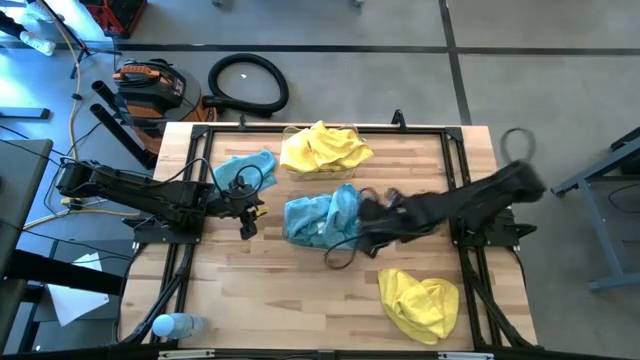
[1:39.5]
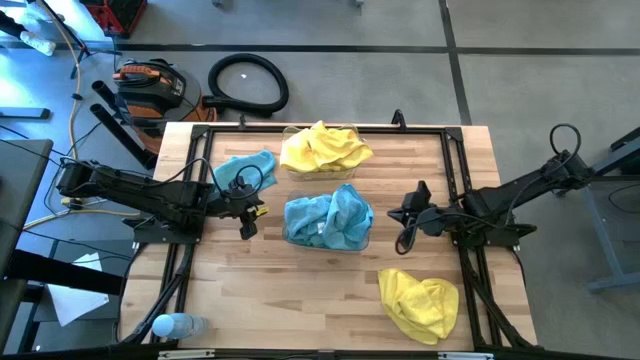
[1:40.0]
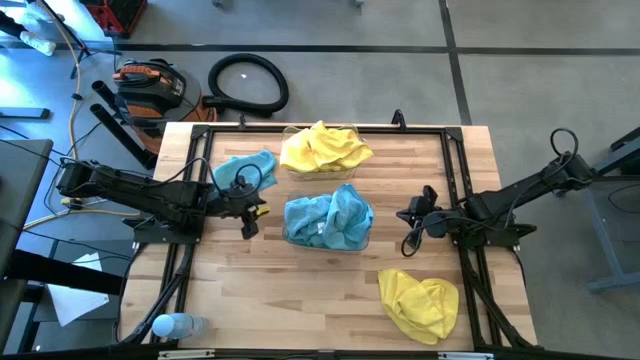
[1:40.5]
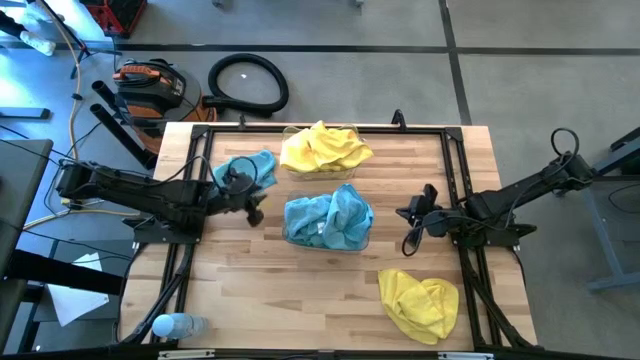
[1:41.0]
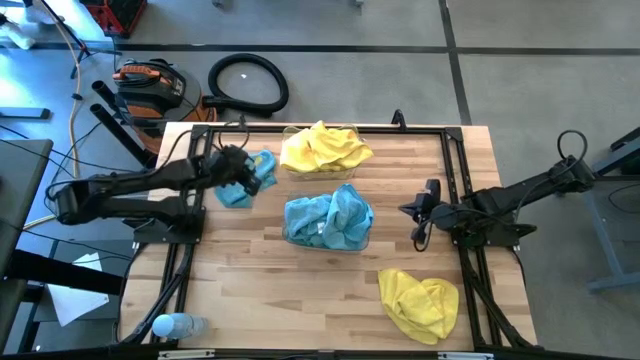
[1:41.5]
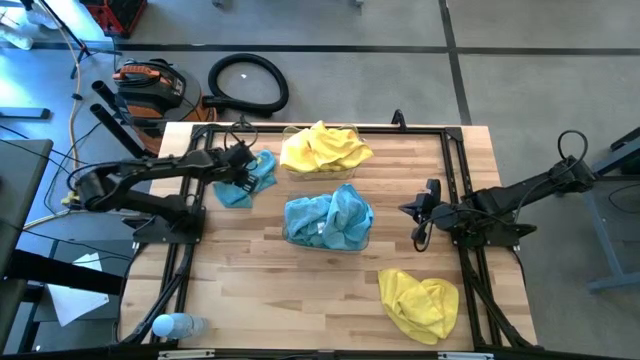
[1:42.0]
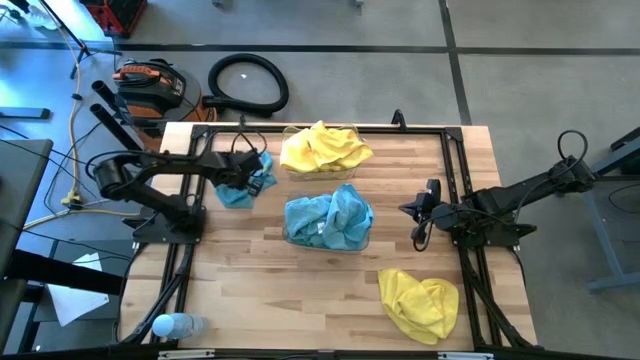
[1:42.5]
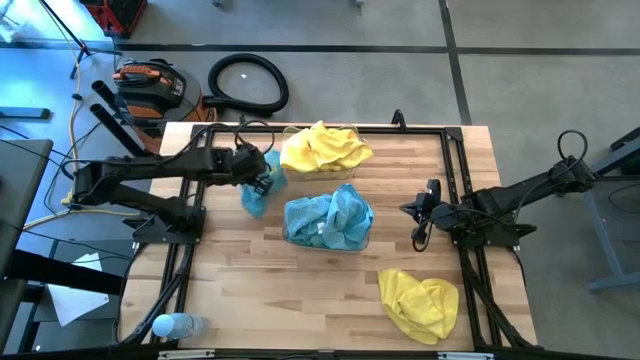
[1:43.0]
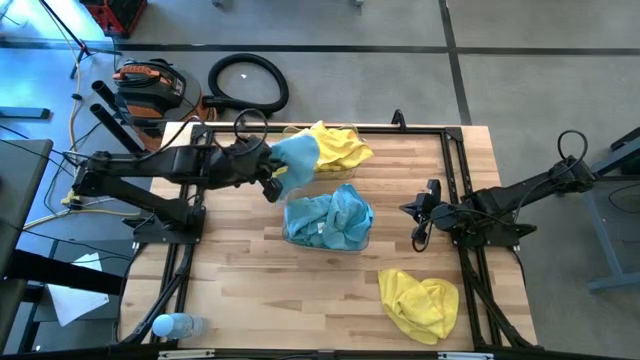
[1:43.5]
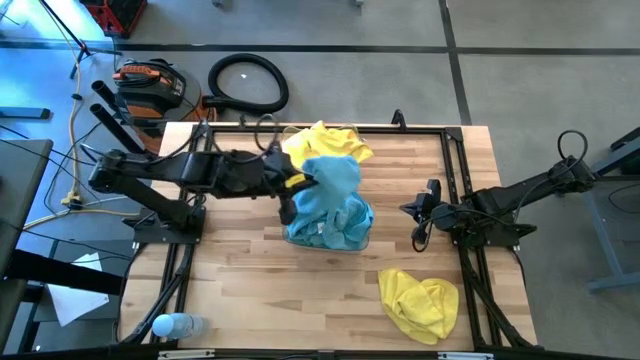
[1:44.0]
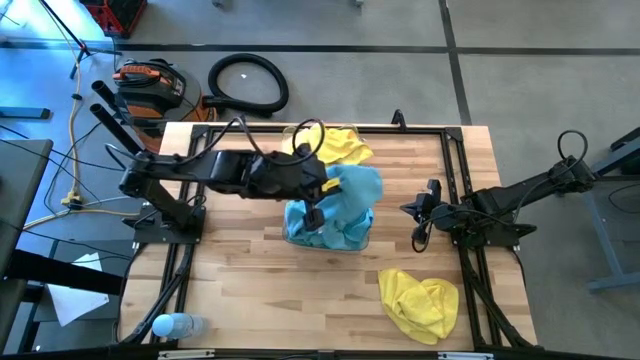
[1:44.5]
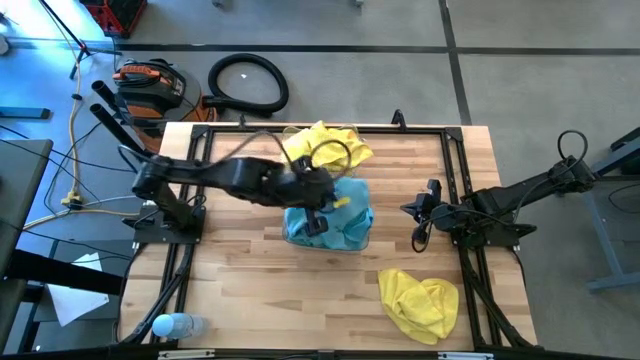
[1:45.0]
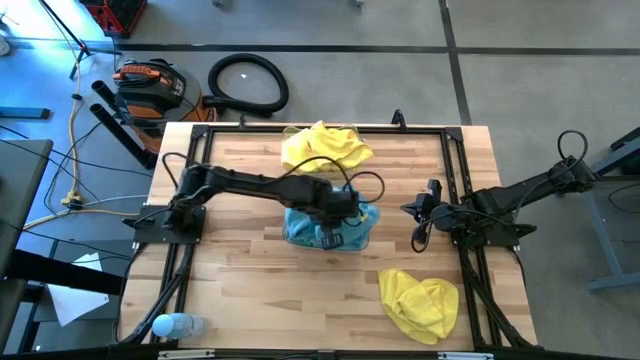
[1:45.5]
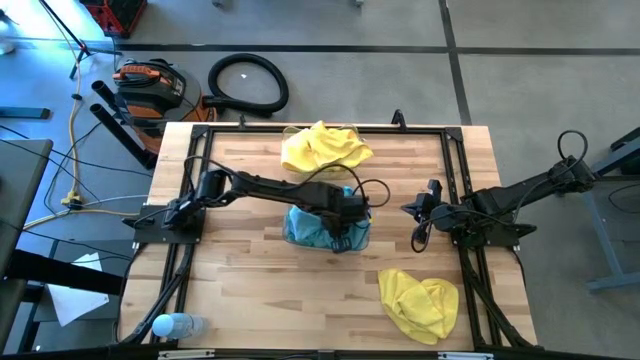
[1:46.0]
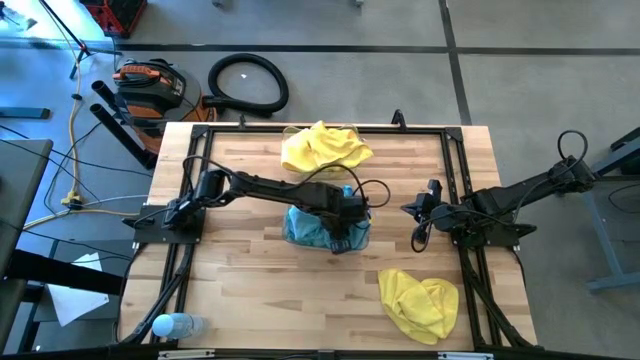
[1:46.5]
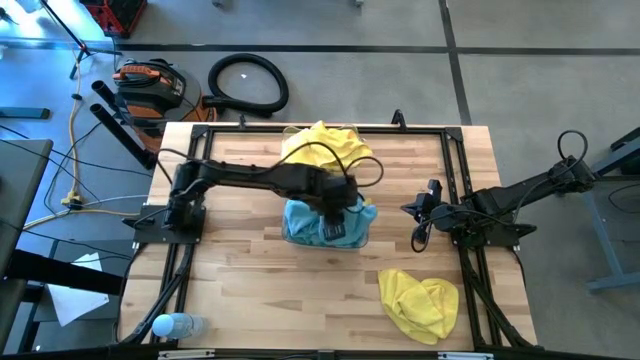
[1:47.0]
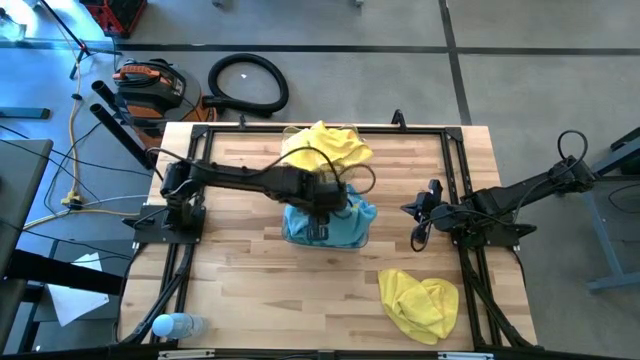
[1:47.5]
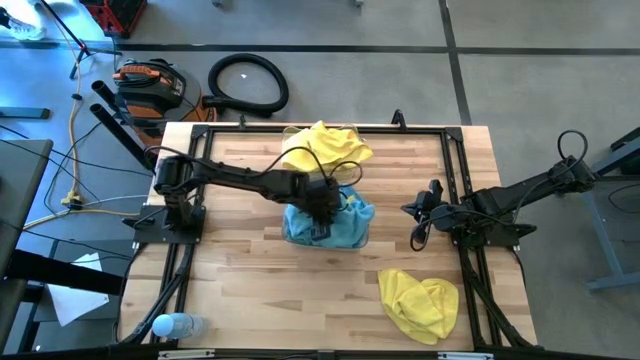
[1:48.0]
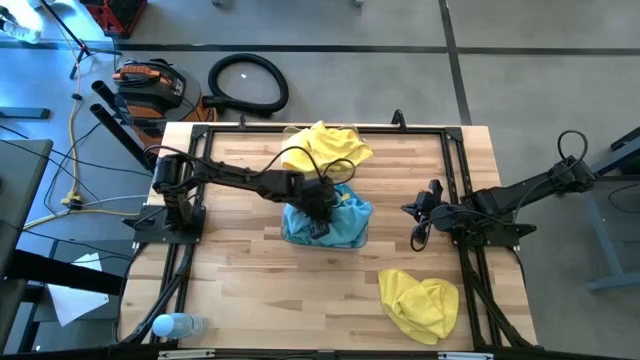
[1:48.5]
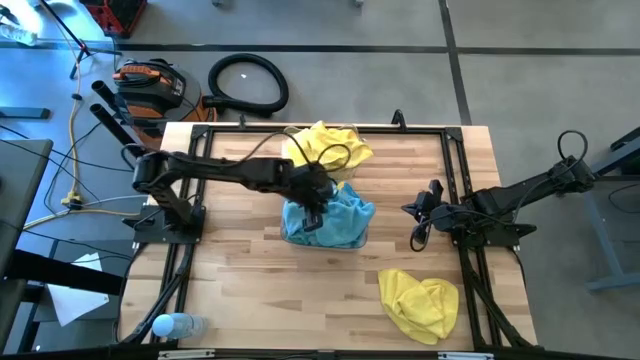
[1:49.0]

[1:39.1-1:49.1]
Task: Sort microfiber towel by color & place in baskets
Put the blue microfiber towel into the bottom transparent bin

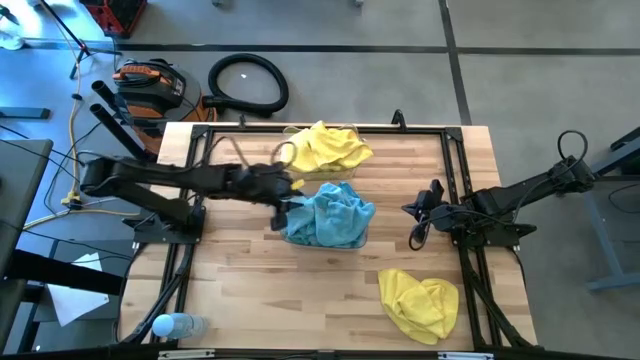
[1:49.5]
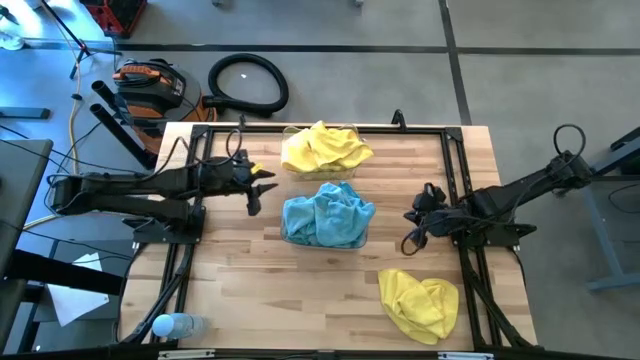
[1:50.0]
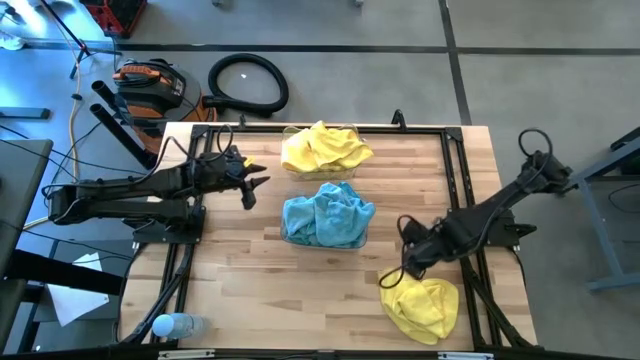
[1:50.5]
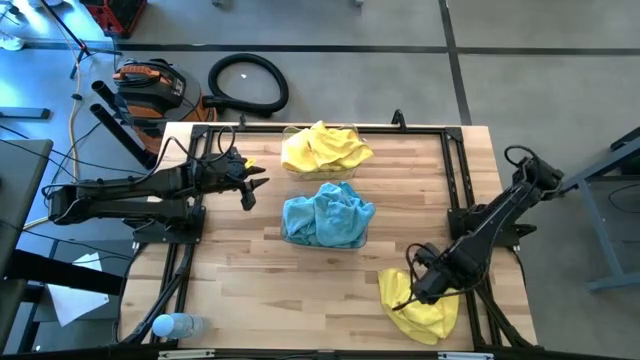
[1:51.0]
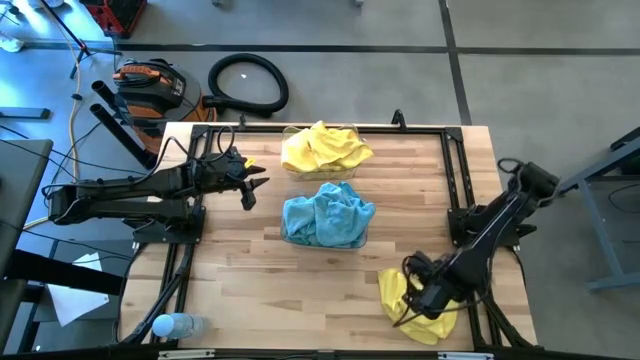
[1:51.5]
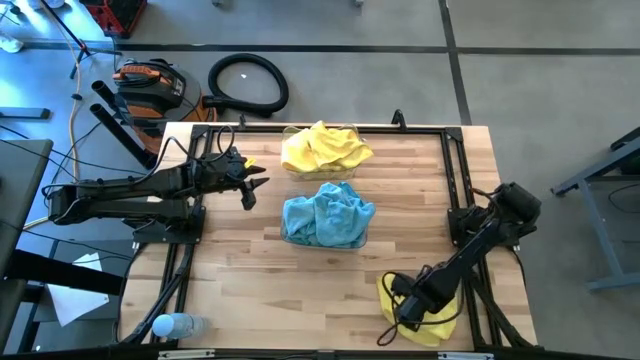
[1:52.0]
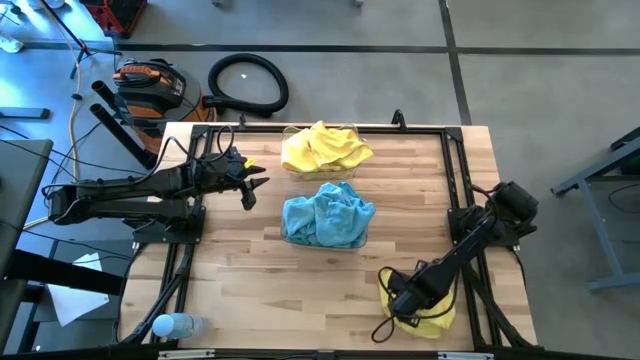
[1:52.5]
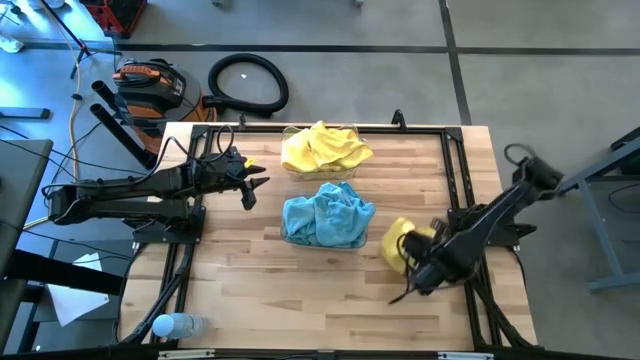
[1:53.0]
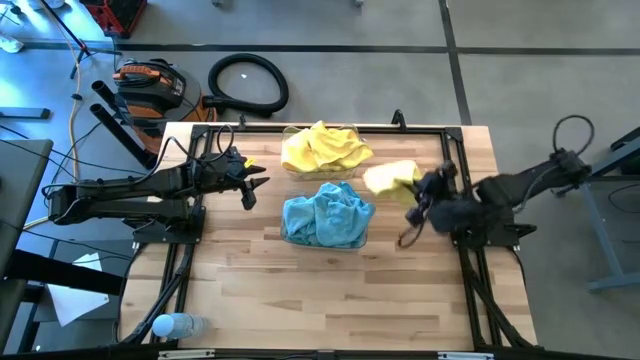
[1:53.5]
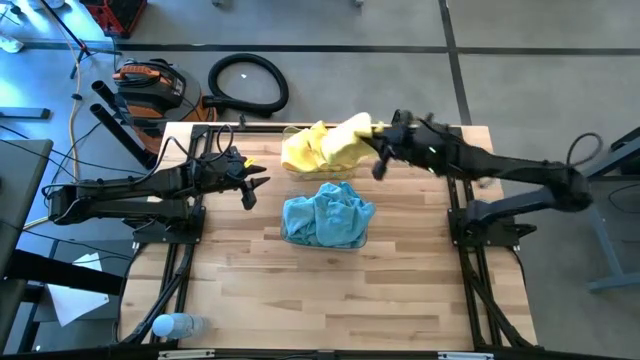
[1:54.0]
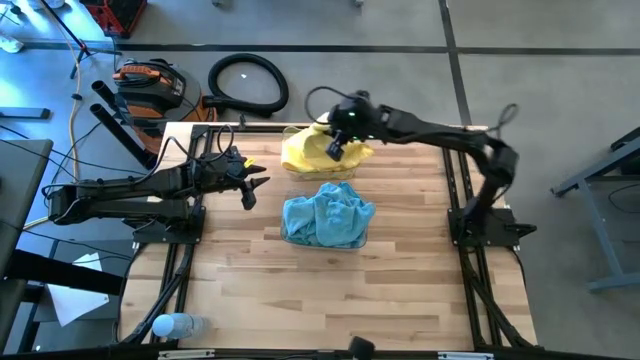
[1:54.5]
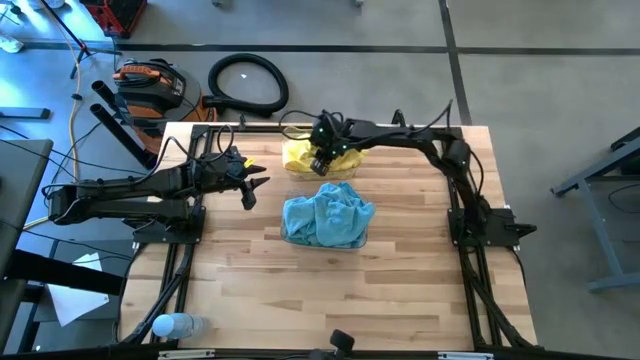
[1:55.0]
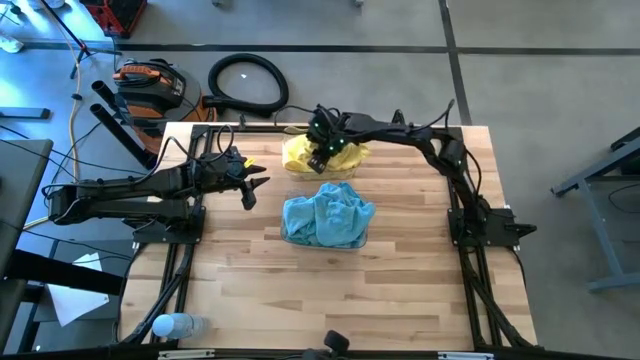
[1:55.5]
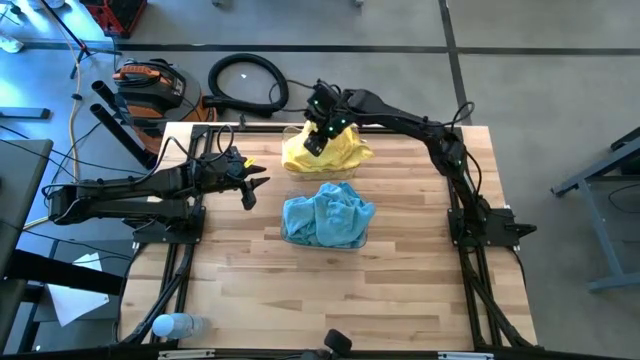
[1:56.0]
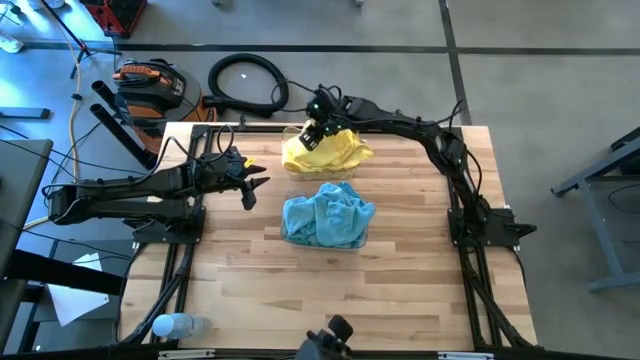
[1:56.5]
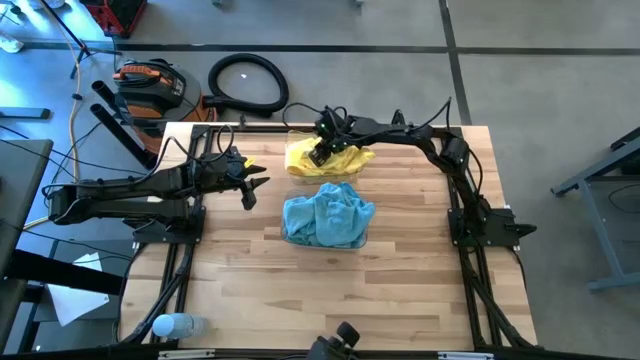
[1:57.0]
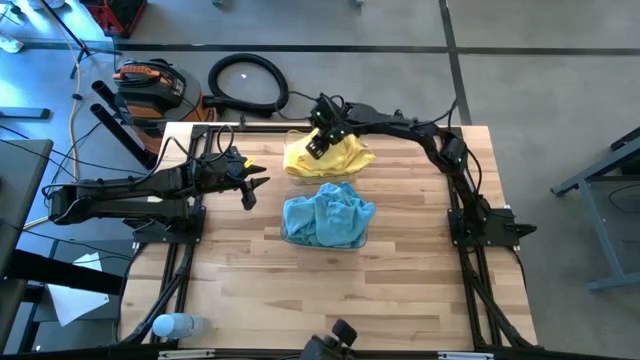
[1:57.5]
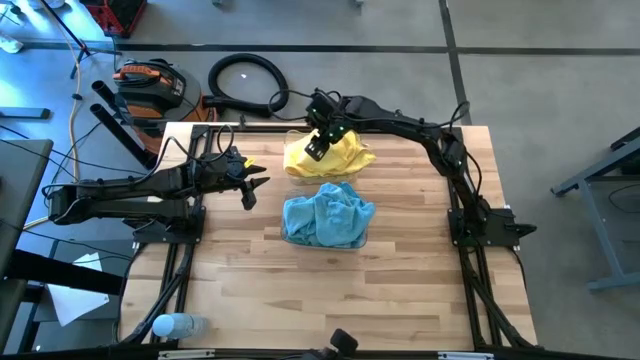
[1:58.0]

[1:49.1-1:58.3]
Put the yellow microfiber towel into the top transparent bin

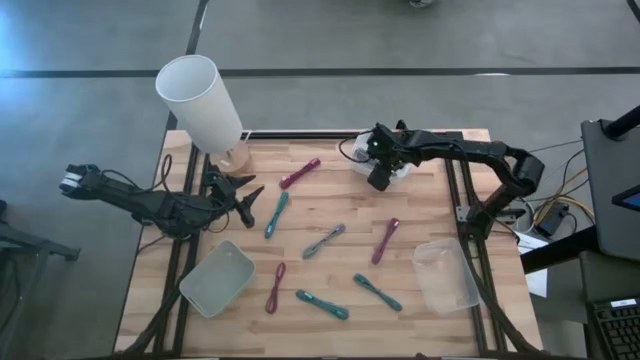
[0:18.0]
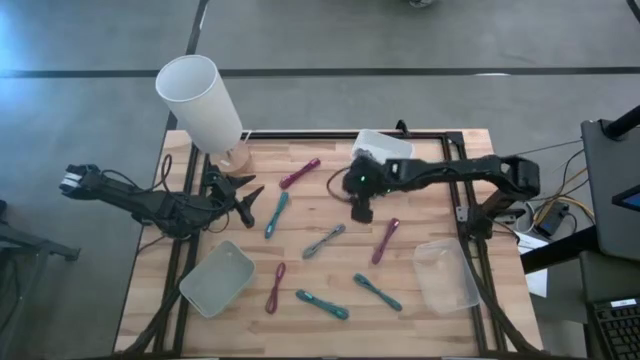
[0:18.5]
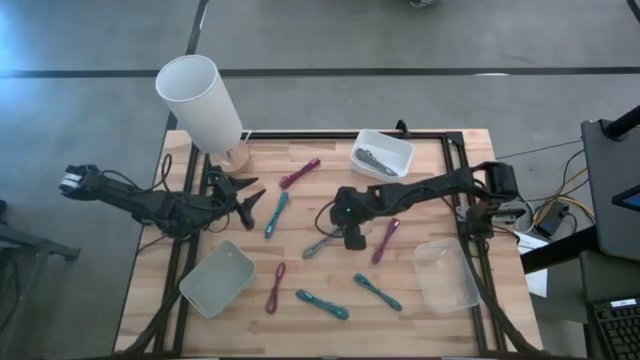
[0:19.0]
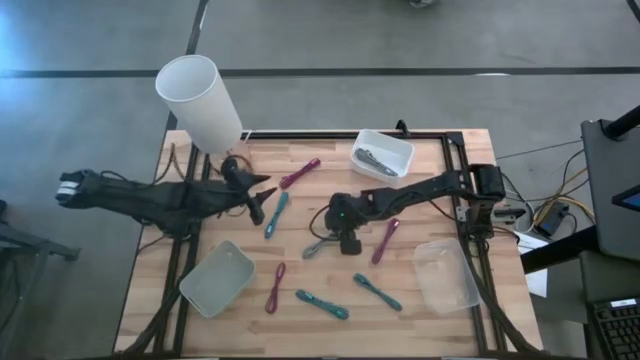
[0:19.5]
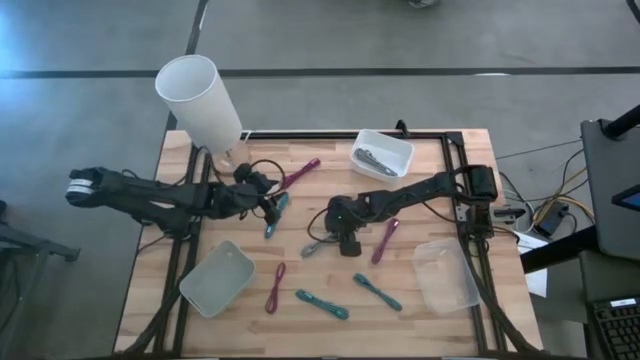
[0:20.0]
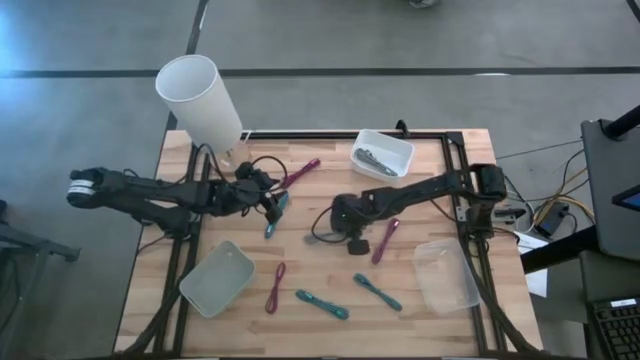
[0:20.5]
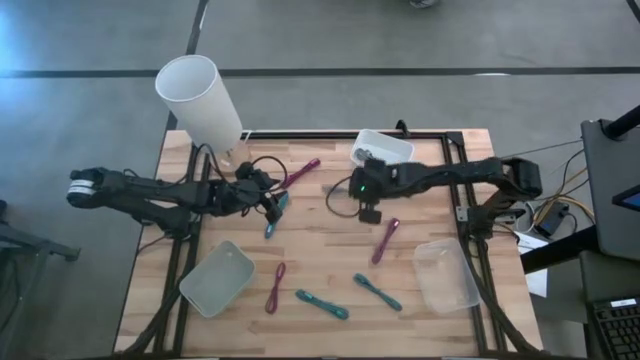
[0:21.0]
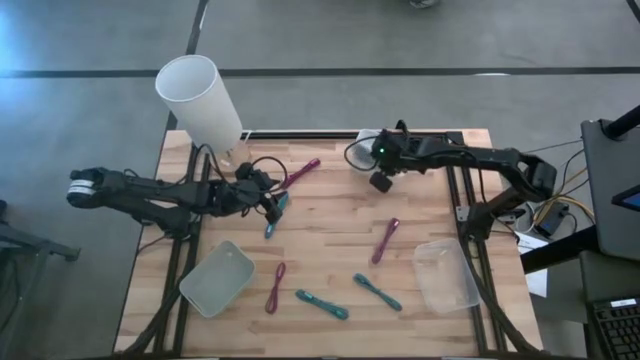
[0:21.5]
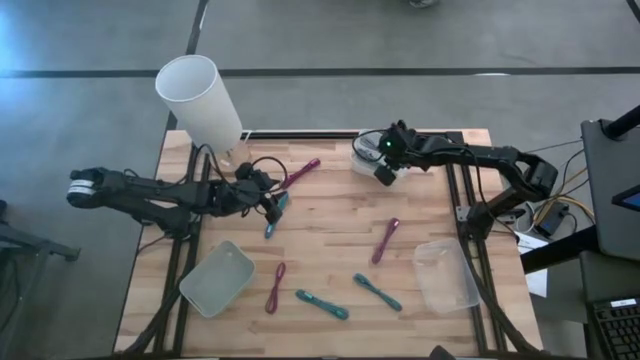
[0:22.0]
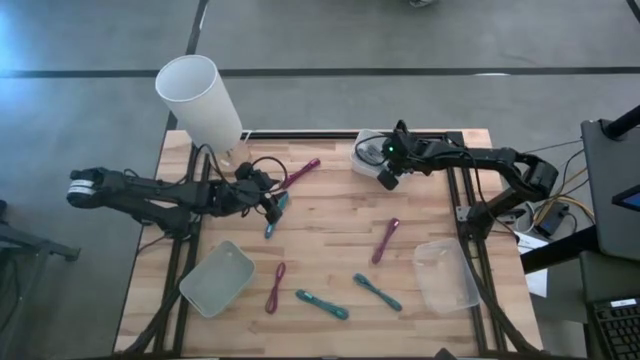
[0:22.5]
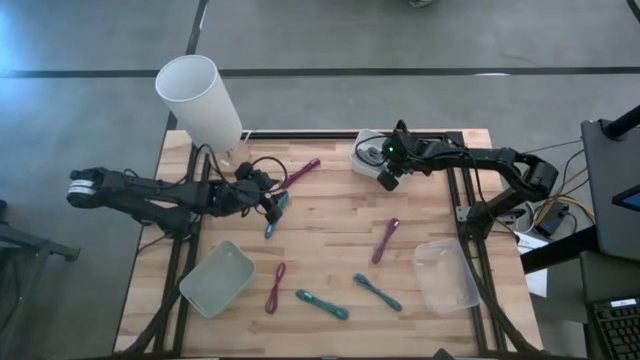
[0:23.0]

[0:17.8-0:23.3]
Task: Pick & Place USB Port
Put the white patterned charger cable into the white bin
